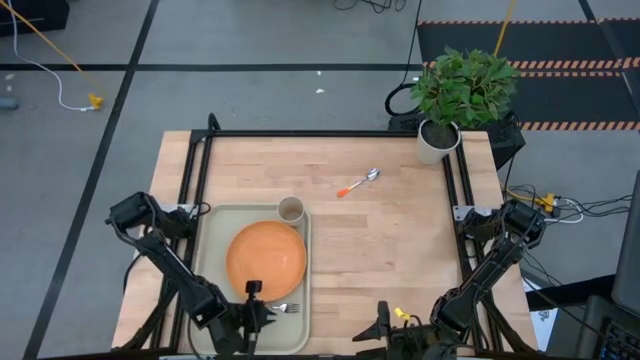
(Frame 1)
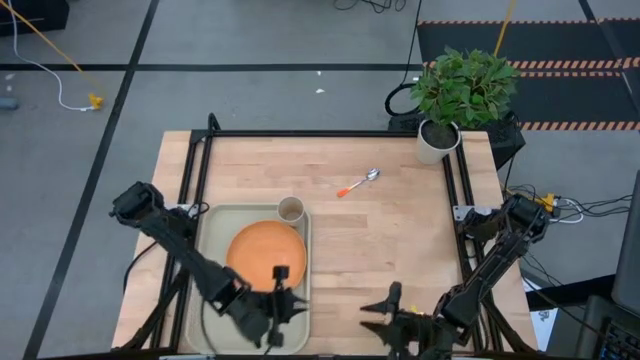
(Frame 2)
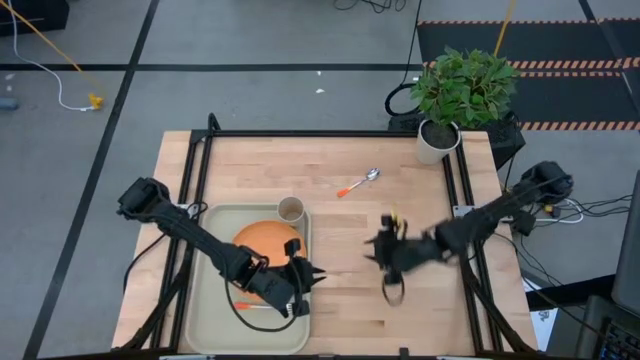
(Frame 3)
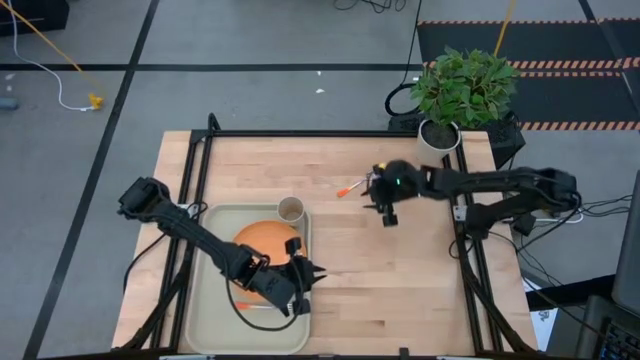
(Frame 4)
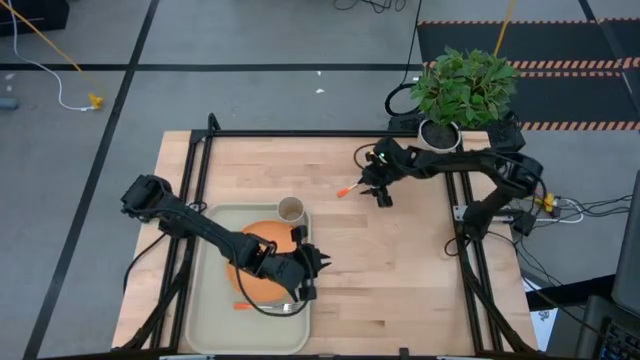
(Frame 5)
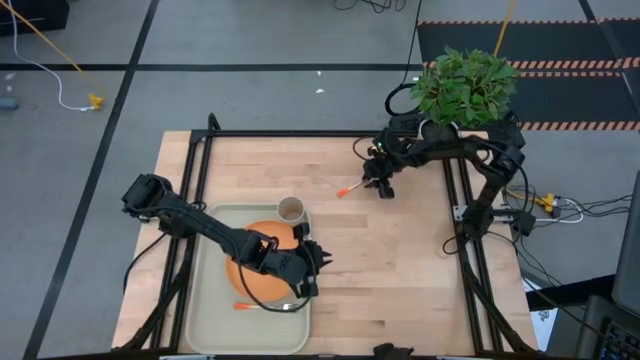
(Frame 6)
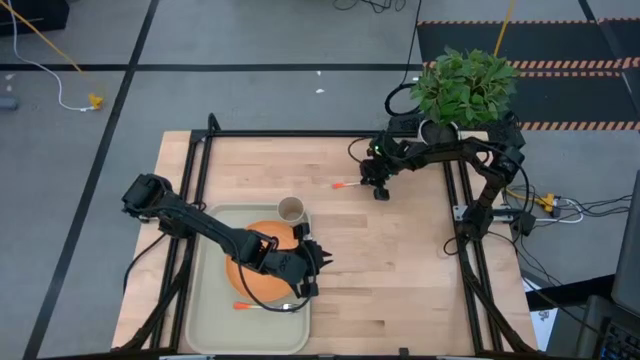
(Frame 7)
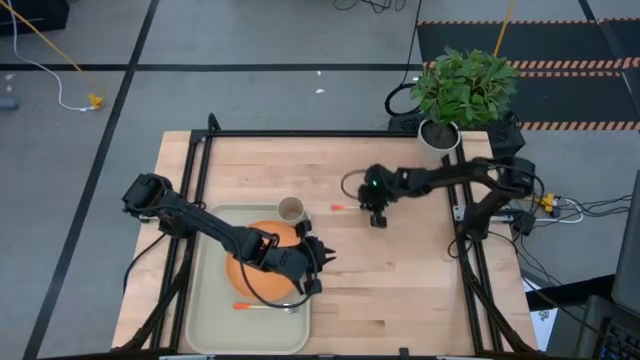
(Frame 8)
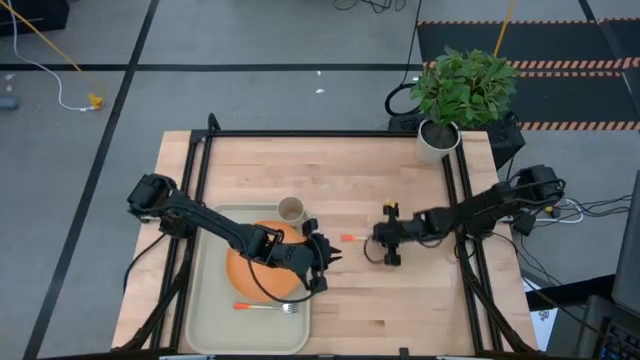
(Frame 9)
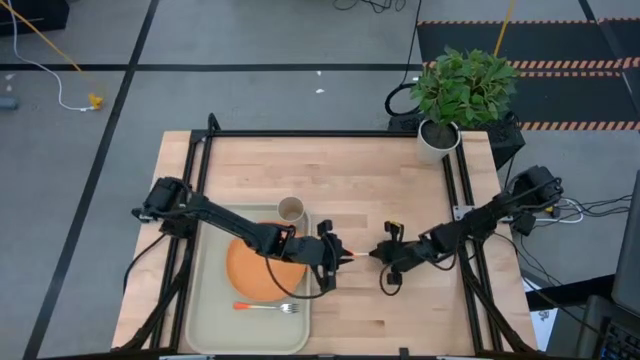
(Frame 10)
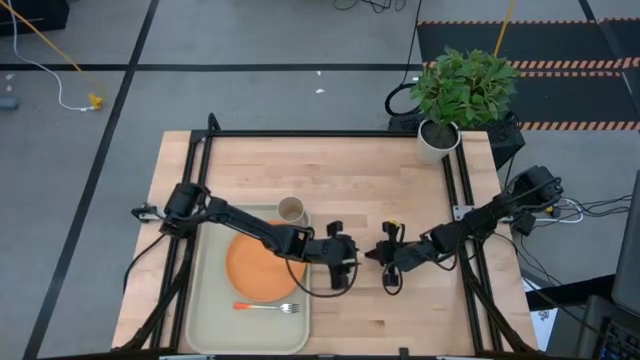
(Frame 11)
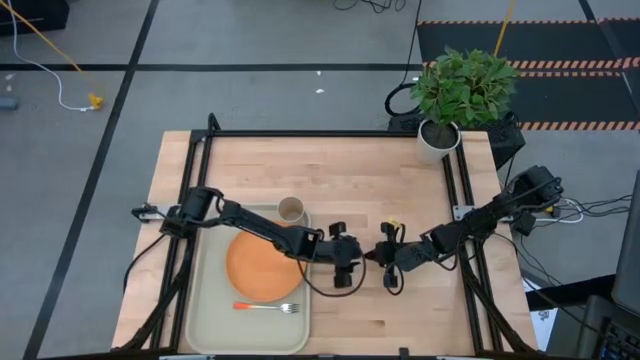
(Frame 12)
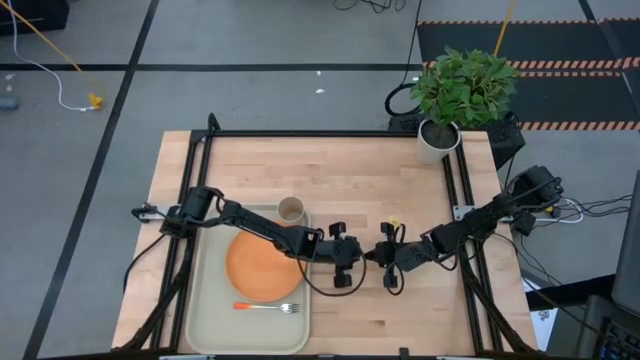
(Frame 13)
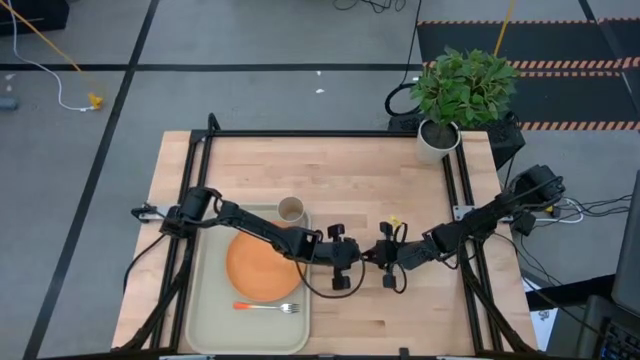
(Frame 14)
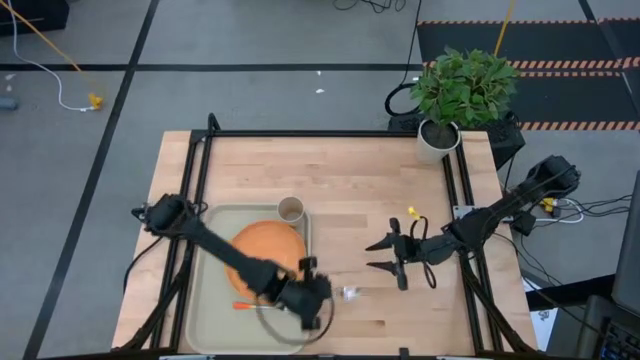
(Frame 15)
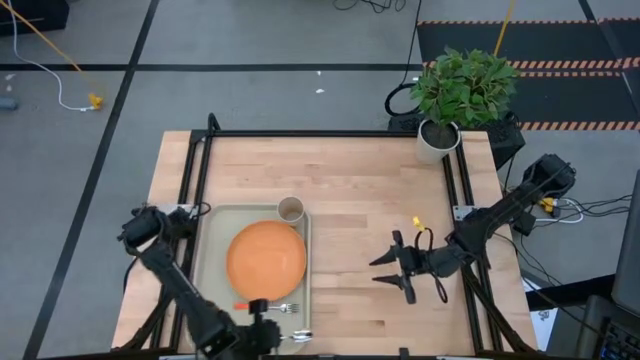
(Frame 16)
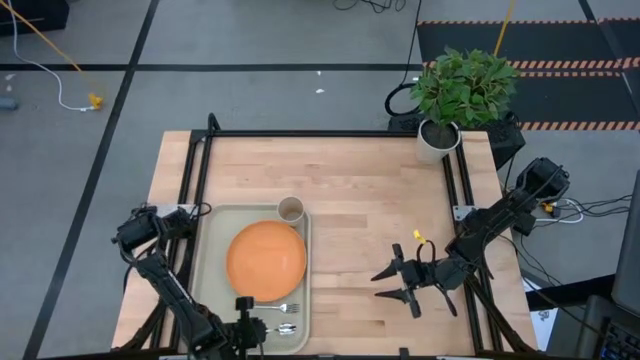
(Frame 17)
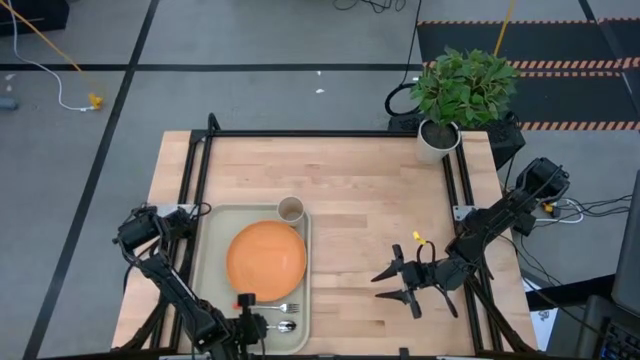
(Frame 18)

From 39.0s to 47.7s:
Task: Pick and place plate/cup/fork/spoon on tray
Put the orange spoon on the light yellow tray to the right of the orange fork

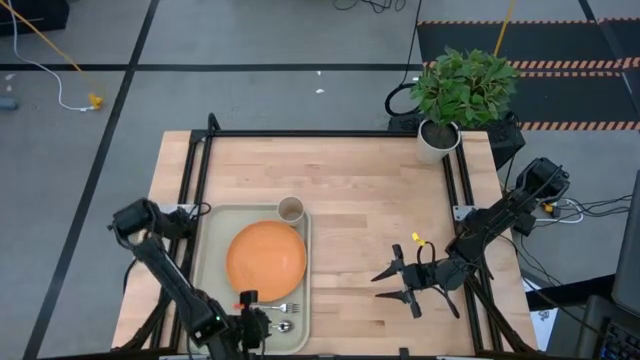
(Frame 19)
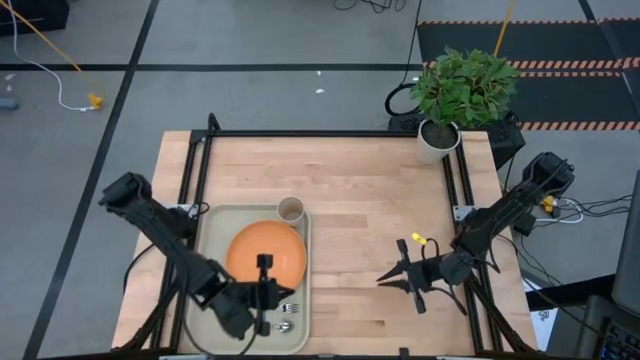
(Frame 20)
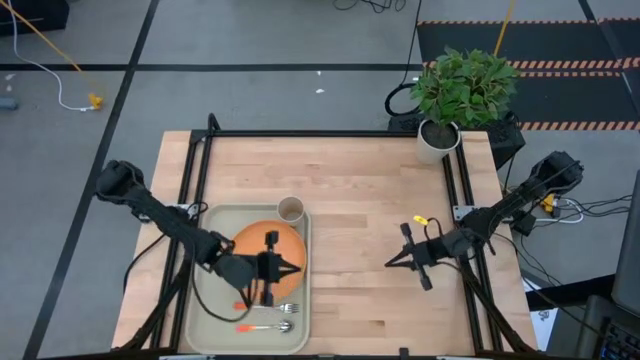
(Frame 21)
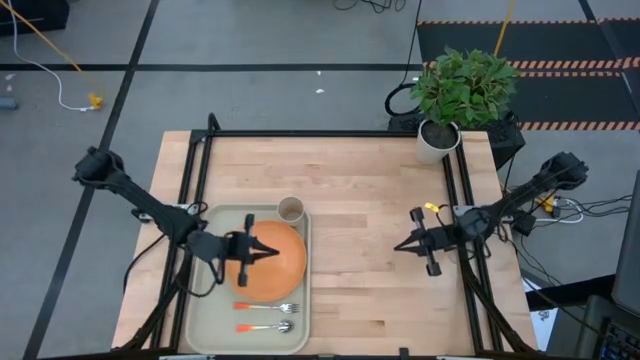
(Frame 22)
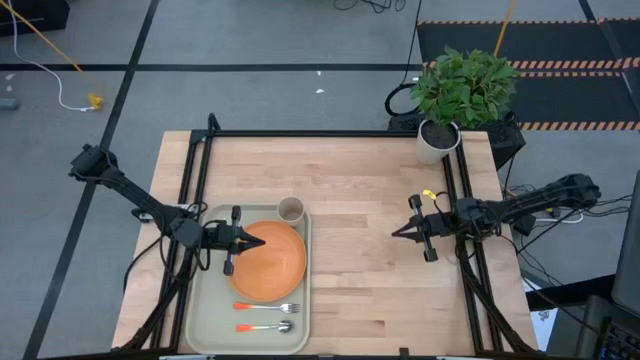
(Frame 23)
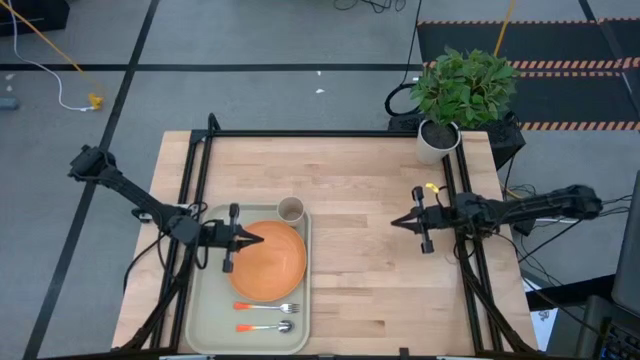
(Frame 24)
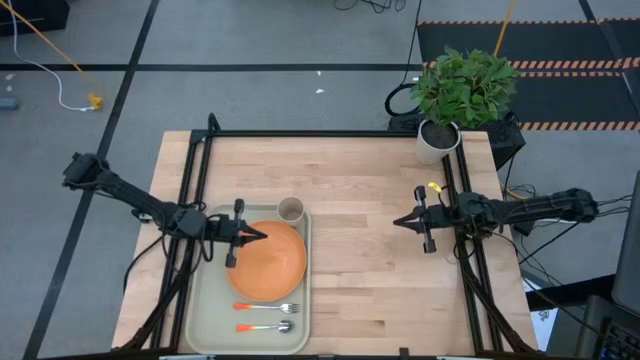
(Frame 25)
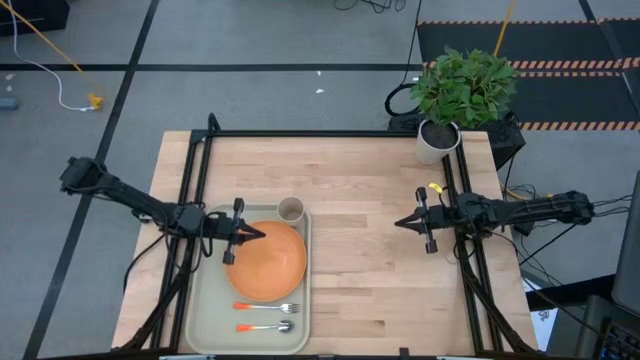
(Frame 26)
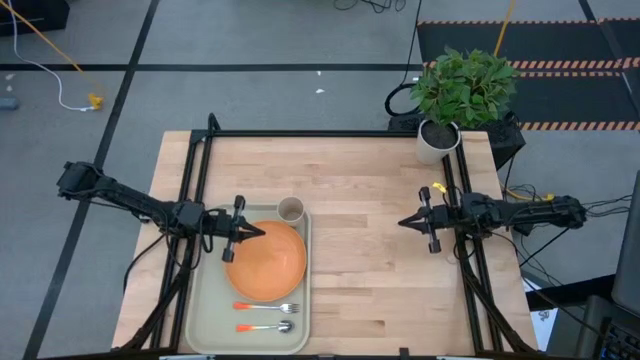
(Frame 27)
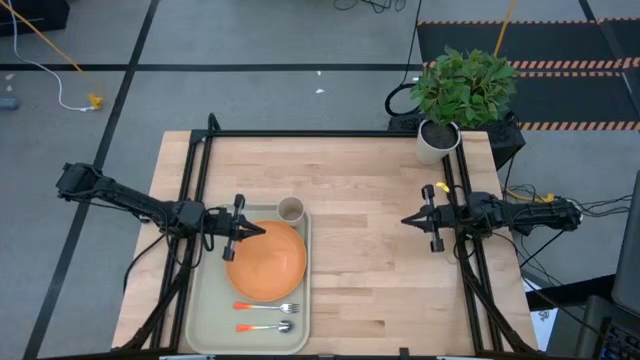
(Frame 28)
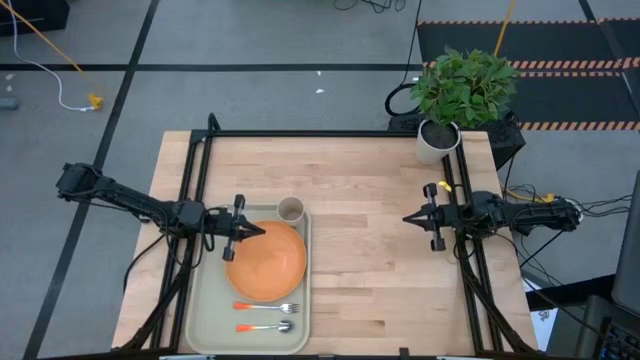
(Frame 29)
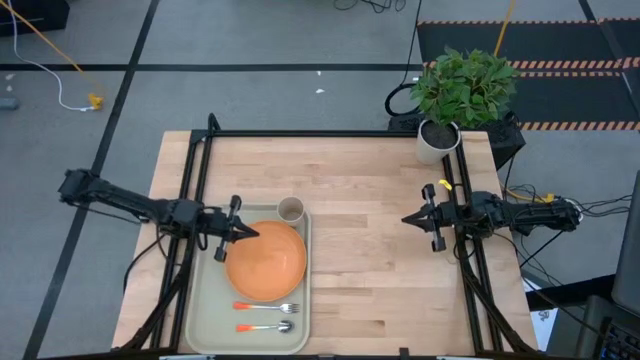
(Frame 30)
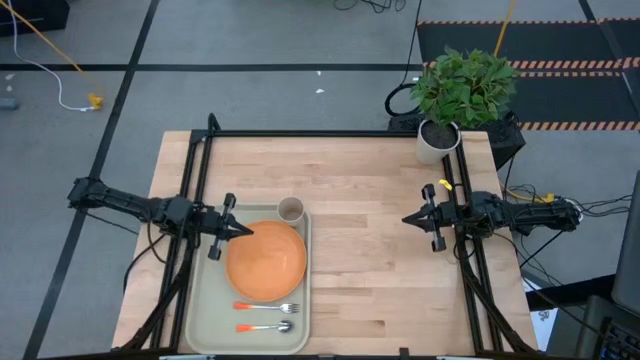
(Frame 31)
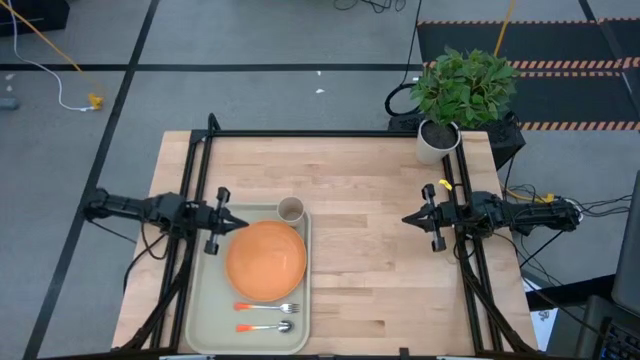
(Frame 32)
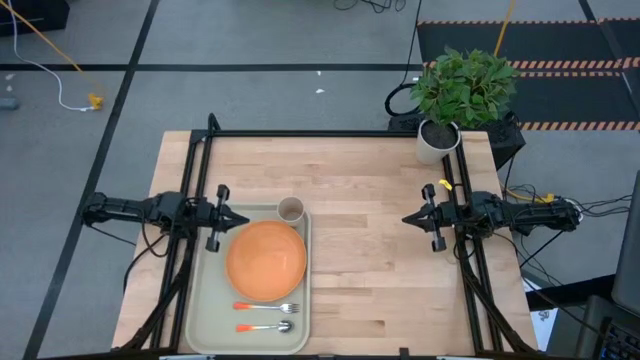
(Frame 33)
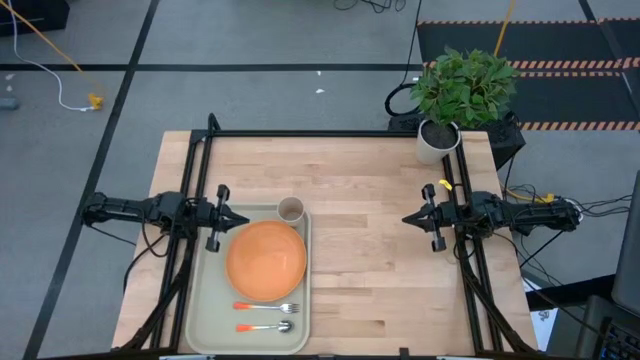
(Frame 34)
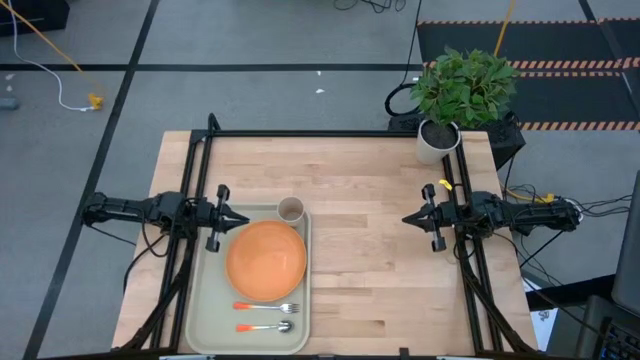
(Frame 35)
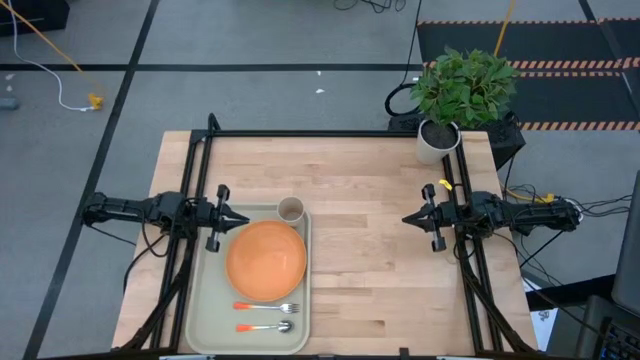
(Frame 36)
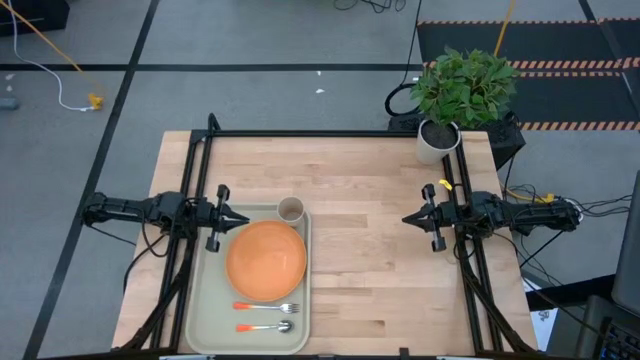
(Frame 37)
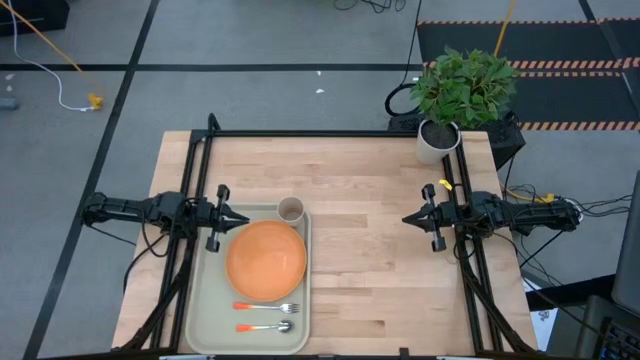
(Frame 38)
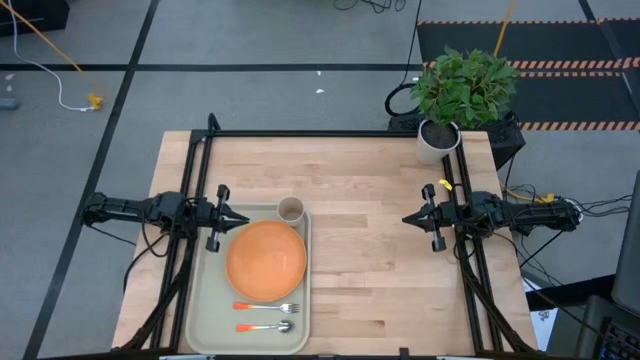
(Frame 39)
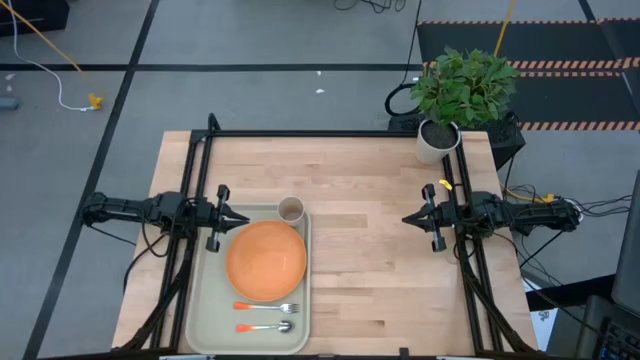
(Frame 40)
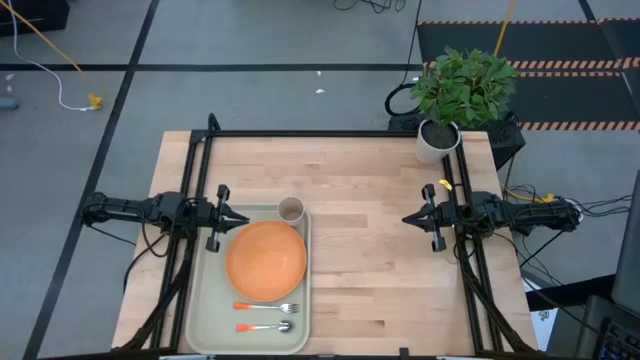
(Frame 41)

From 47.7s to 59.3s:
Return to Home Position

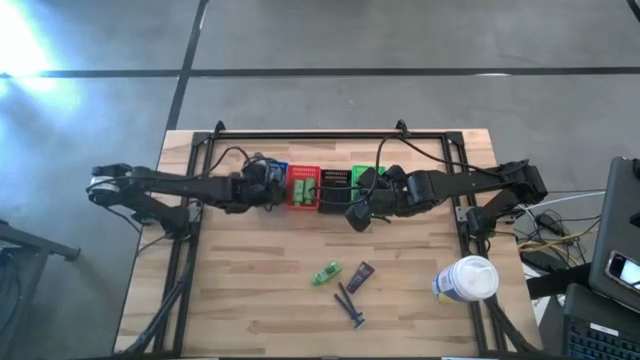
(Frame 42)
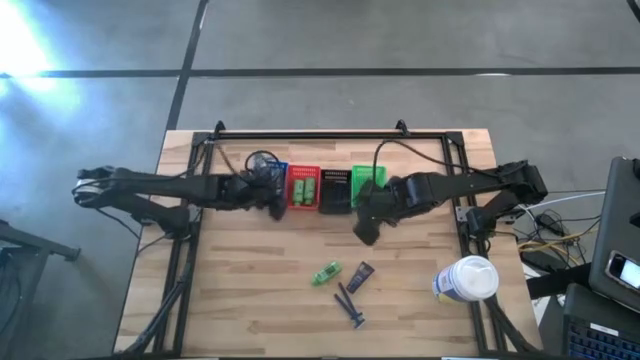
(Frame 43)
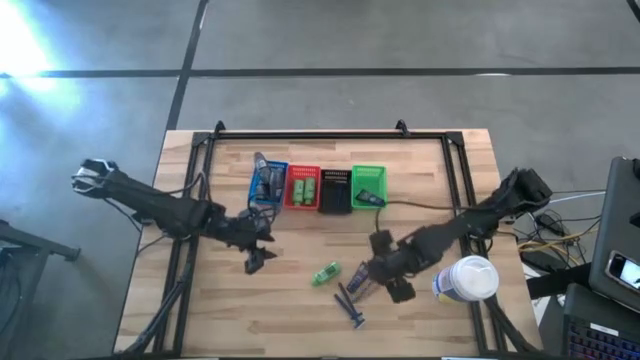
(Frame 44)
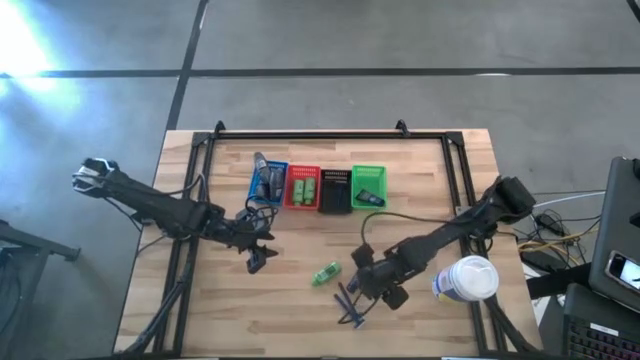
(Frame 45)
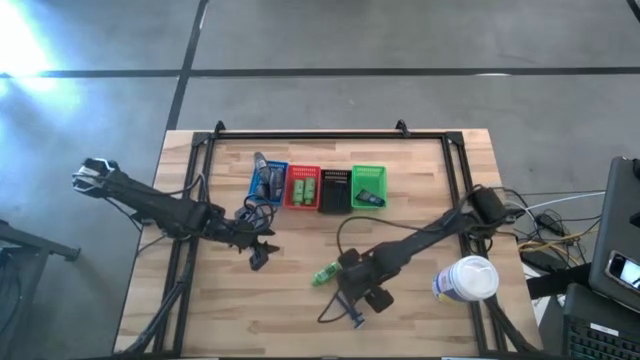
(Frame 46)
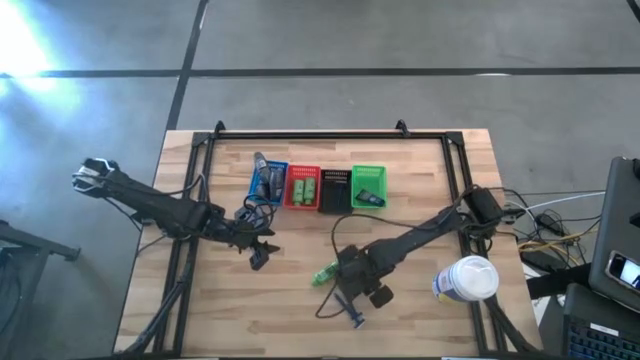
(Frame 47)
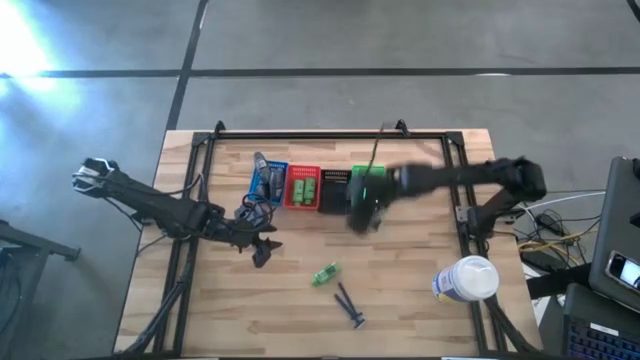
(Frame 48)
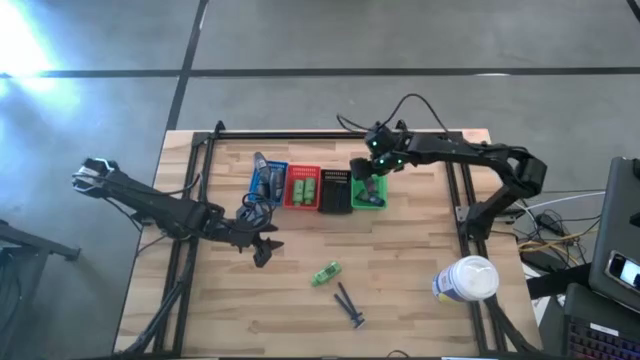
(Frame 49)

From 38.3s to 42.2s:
Task: Pick & Place Travel size toiletries
Put the shave cream into the green basket
